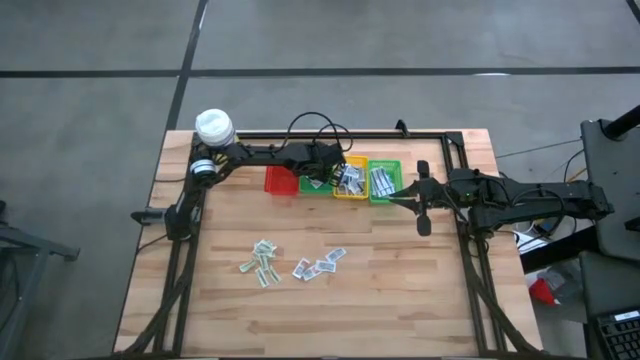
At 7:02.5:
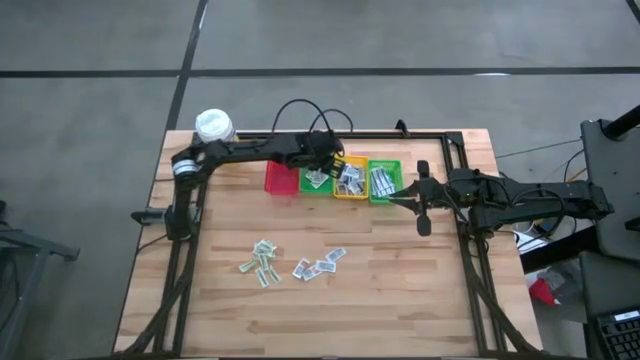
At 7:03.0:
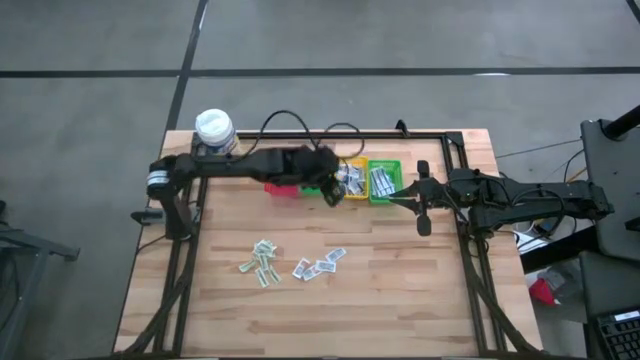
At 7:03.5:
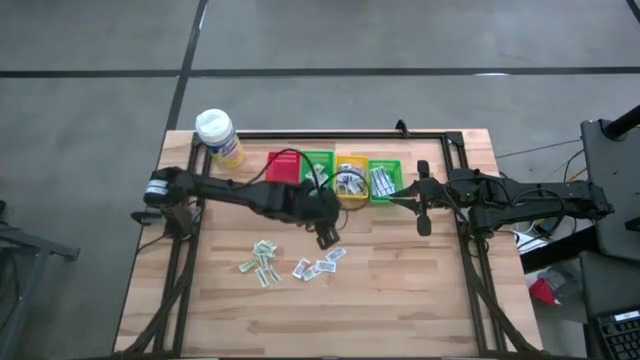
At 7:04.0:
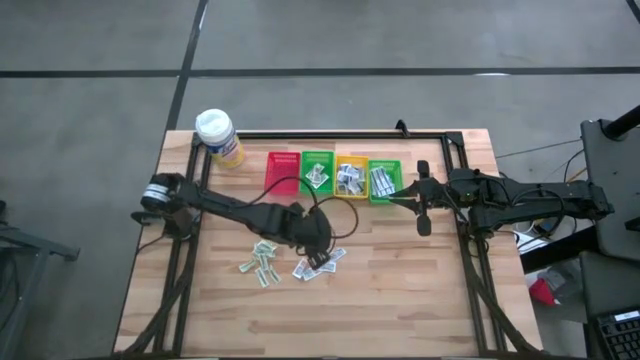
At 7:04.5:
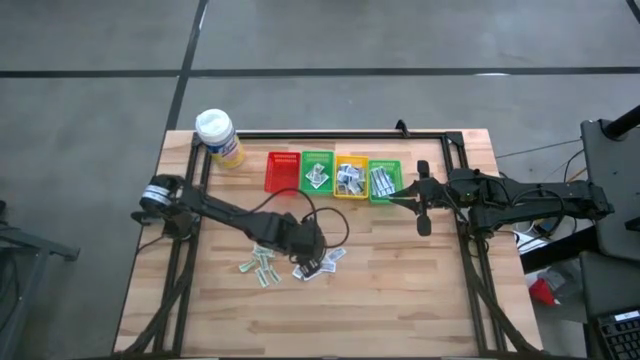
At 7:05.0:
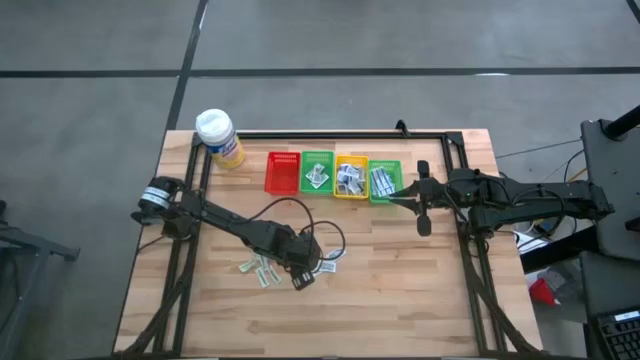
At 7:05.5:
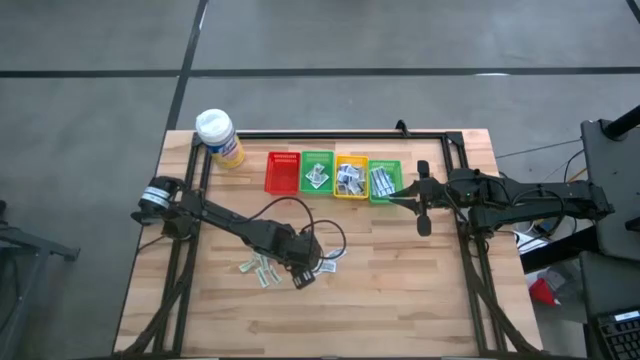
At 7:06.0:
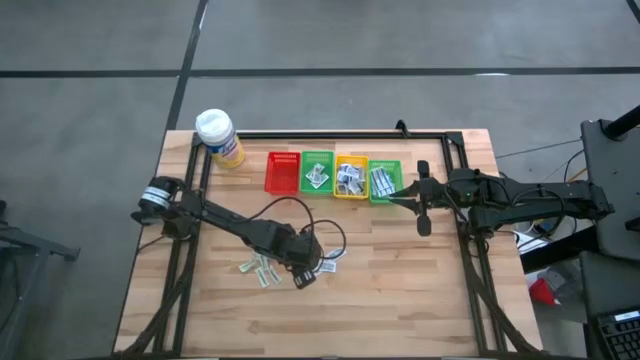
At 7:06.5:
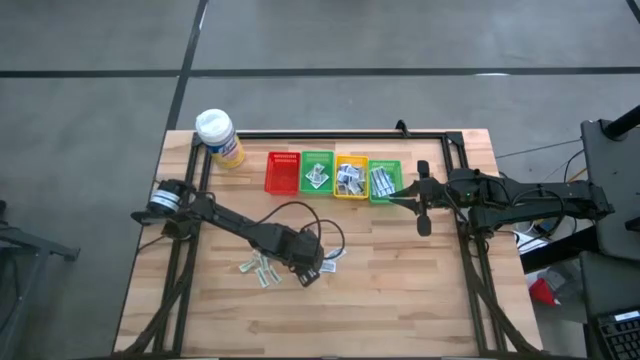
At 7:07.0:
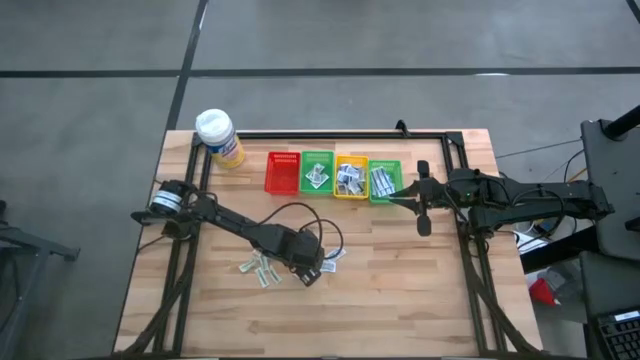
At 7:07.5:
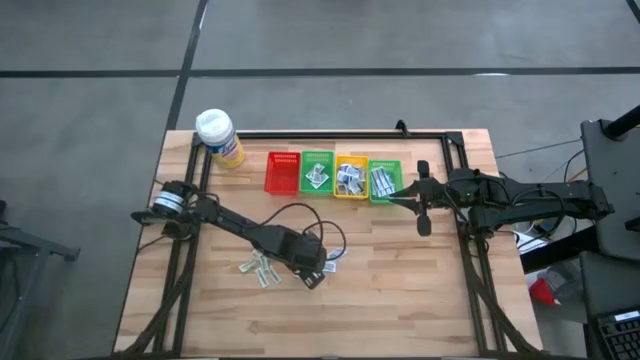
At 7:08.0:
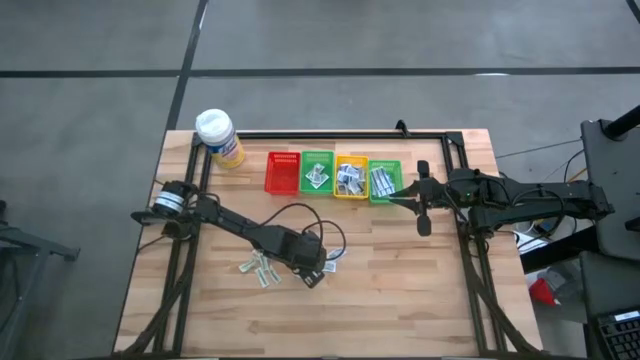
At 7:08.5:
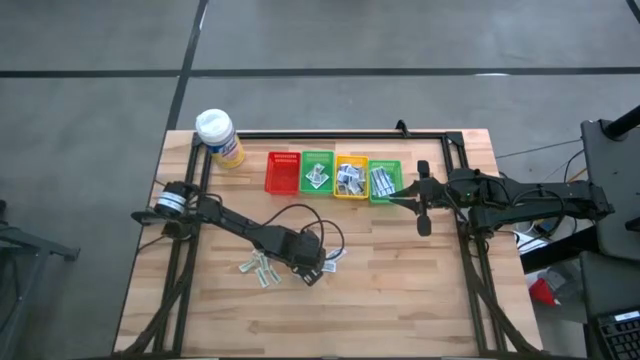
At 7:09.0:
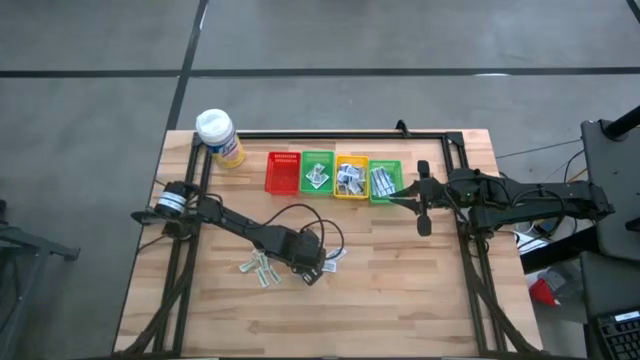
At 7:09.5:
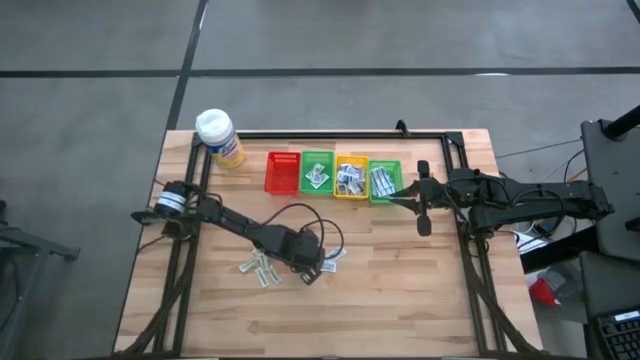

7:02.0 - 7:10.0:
Task: Pick & Place First Aid Supplies
Put the orange ointment pack into the left green bin

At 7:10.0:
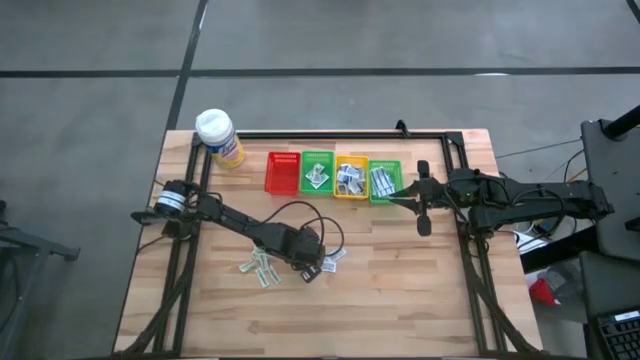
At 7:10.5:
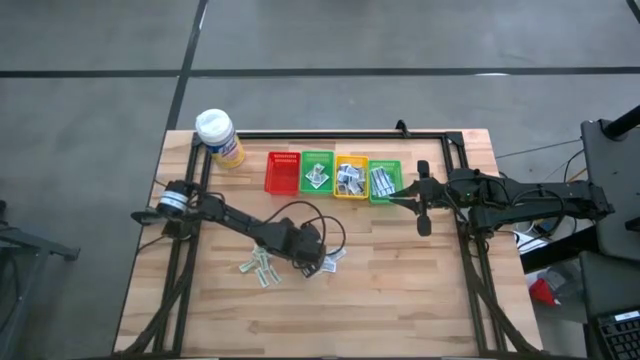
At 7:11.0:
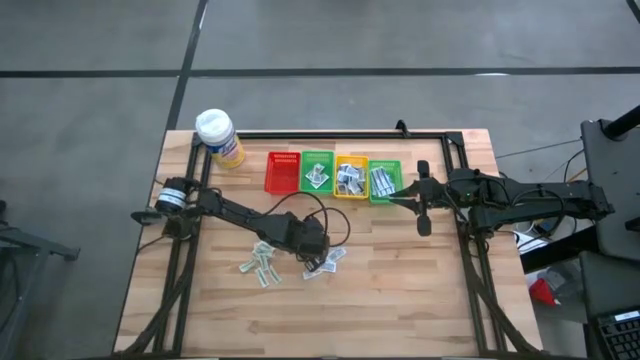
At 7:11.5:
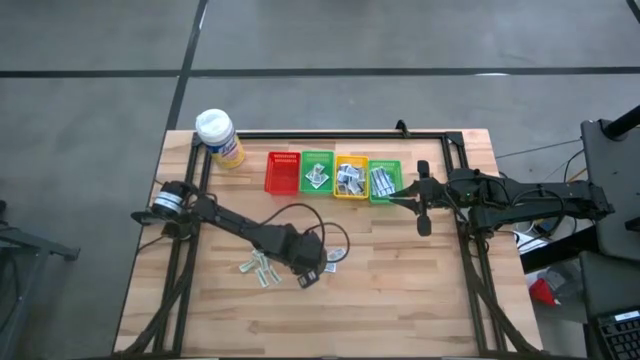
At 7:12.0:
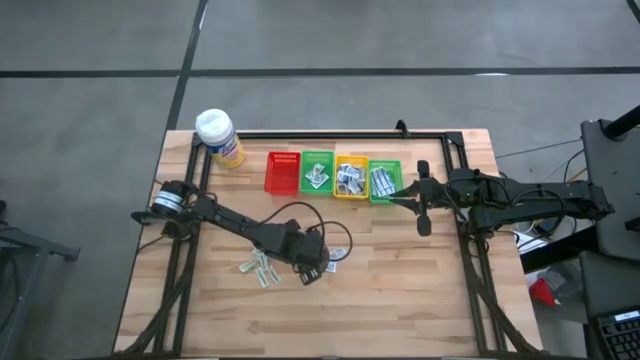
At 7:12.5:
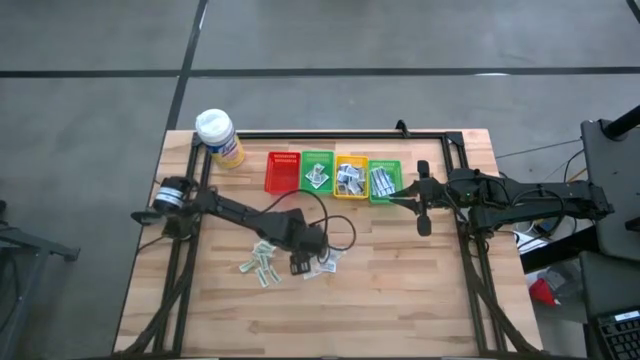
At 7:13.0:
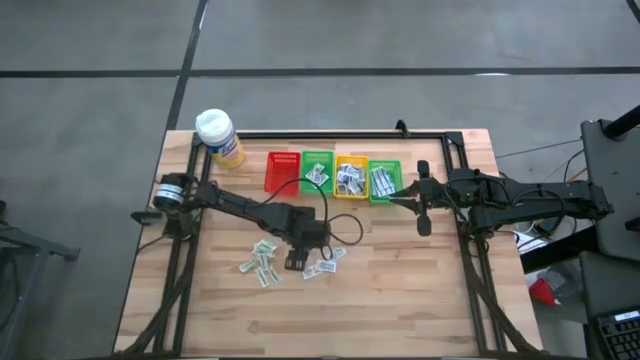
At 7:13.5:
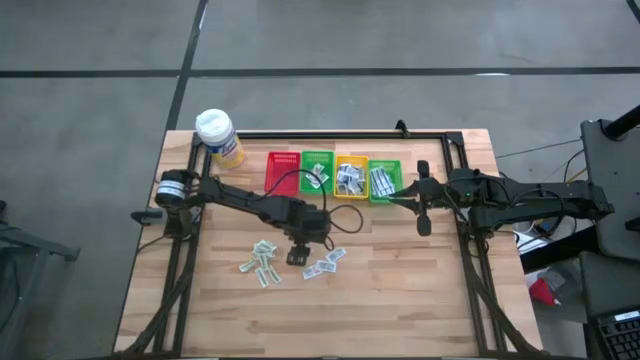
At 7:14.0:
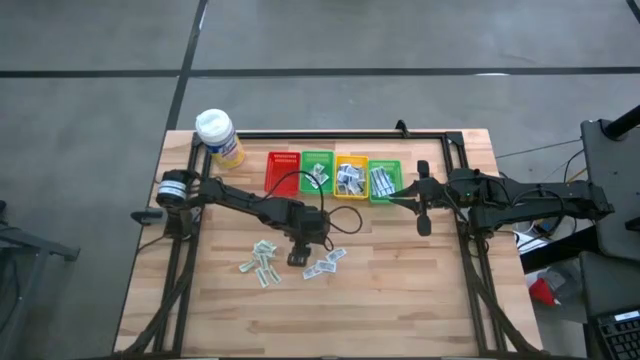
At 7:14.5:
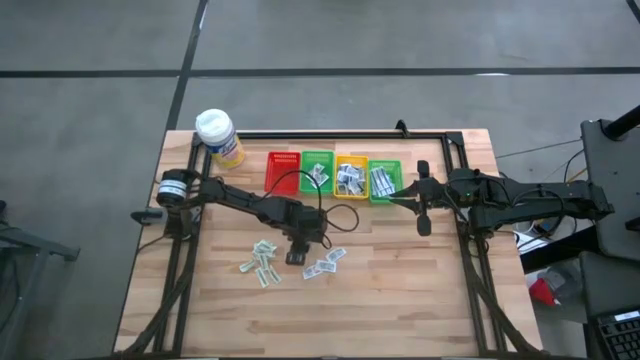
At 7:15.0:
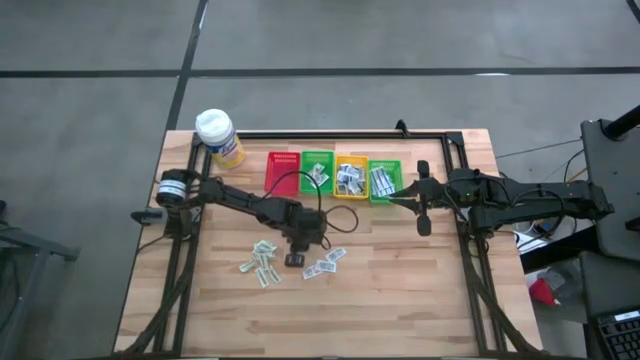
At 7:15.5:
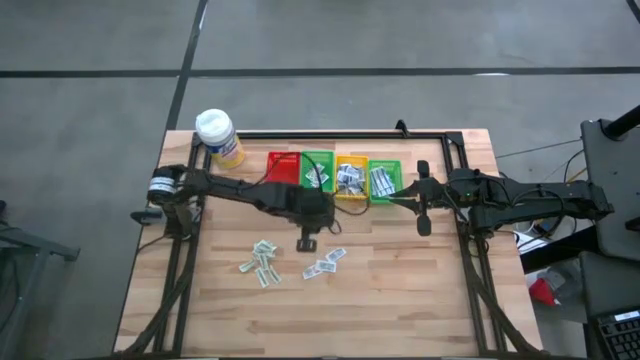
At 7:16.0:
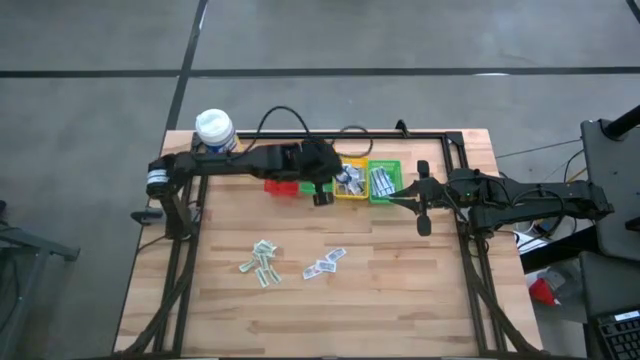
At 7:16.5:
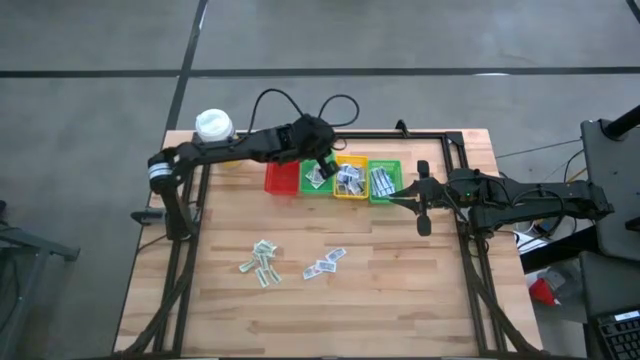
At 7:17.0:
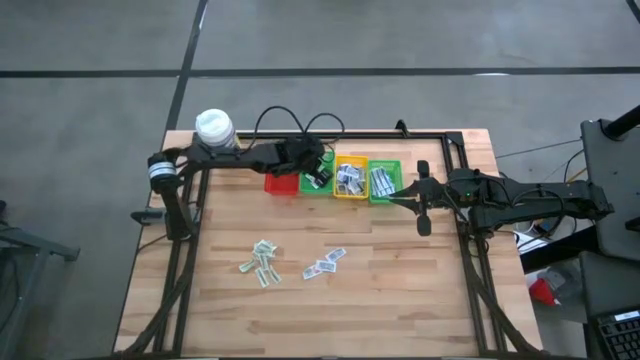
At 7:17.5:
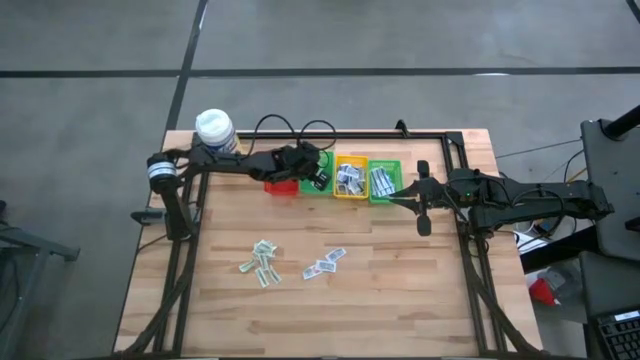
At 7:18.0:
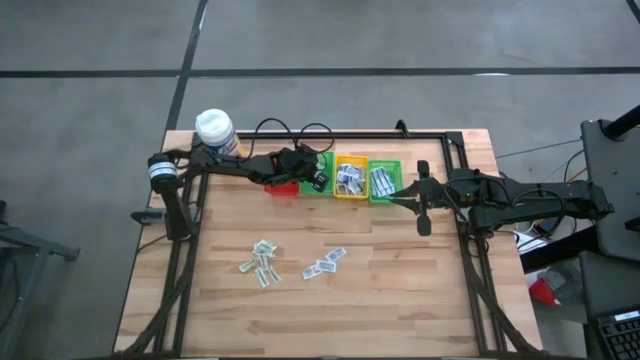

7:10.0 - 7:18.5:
Put the orange ointment pack into the left green bin

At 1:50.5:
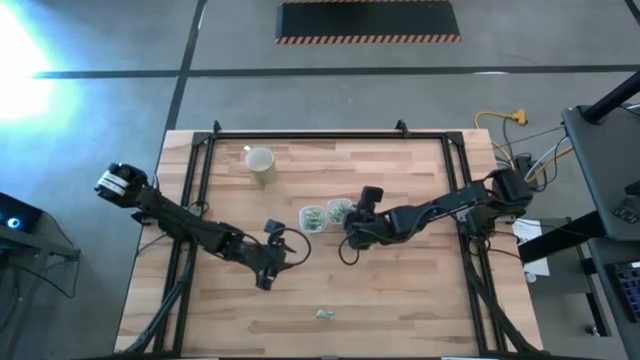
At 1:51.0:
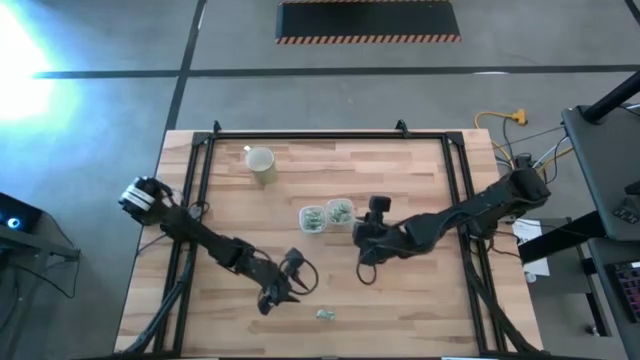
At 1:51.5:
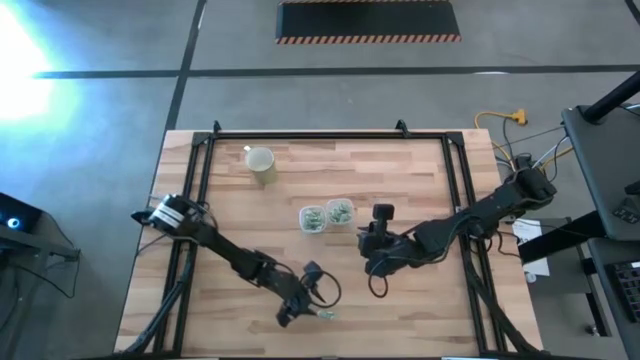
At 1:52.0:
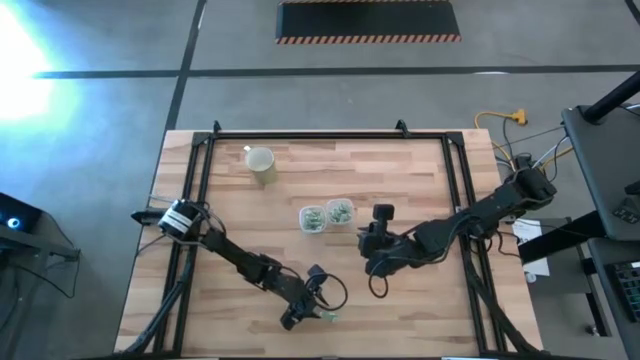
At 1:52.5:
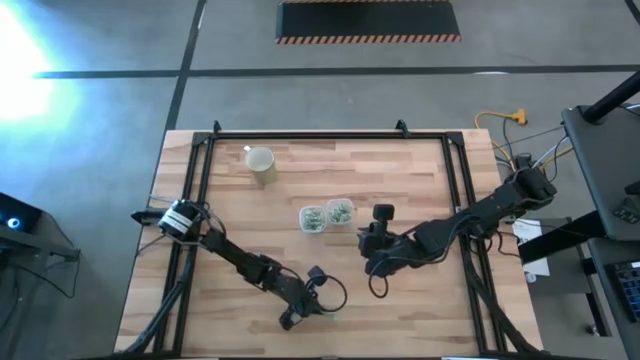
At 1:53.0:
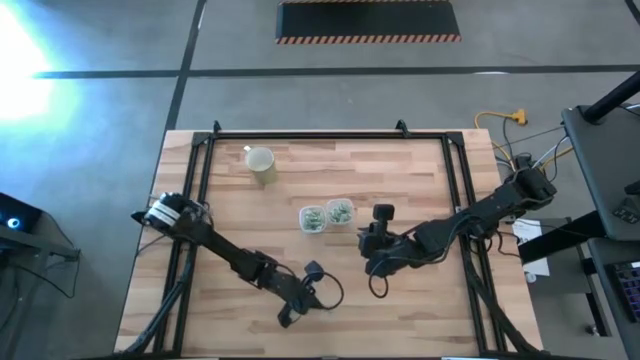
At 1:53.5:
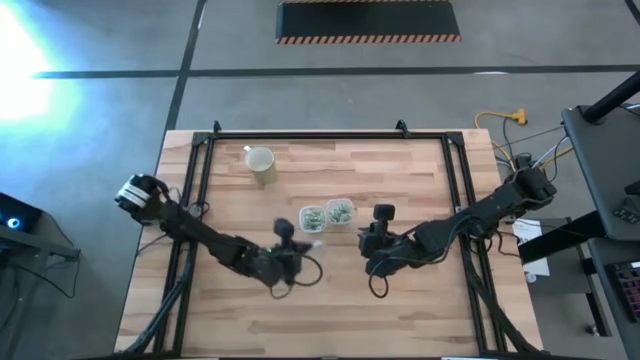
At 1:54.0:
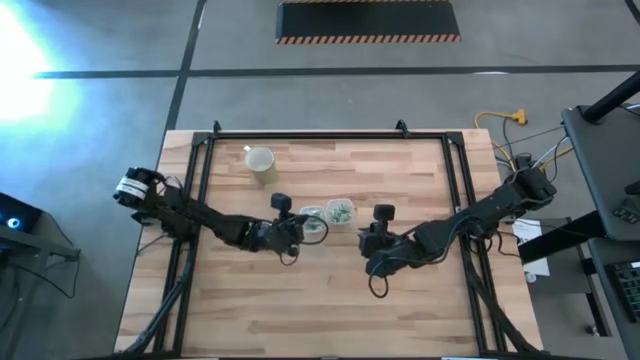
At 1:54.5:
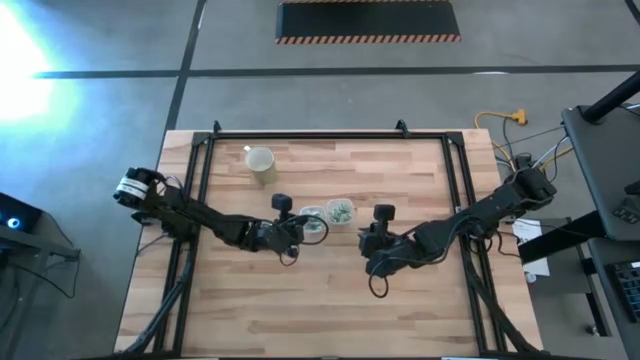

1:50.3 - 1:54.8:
Task: Pick and place items into bin
Put the stevia packet into the left transparent bin
